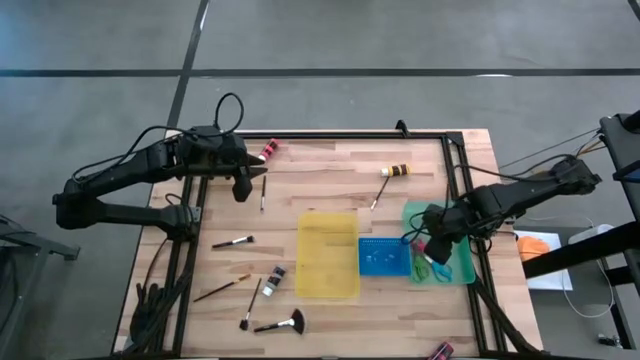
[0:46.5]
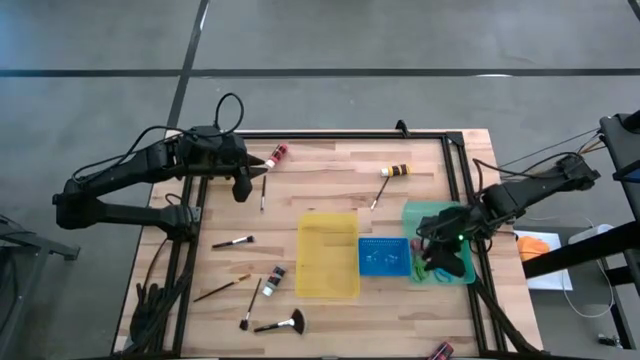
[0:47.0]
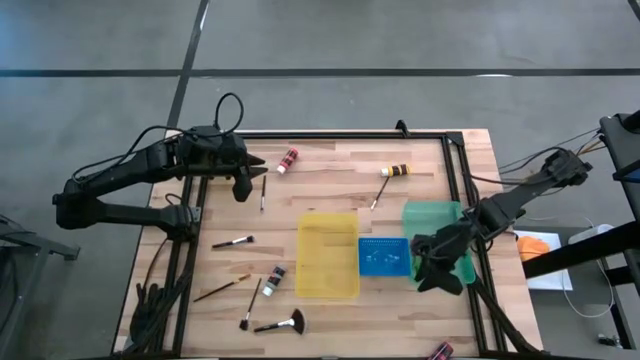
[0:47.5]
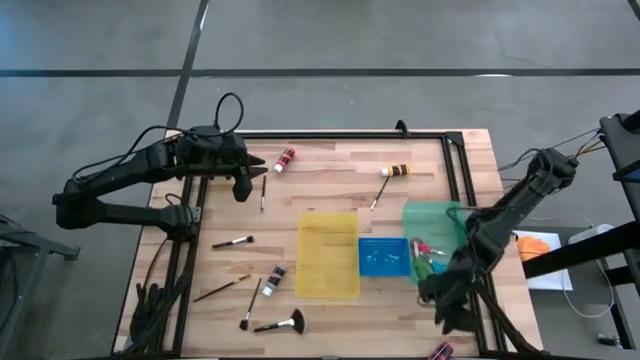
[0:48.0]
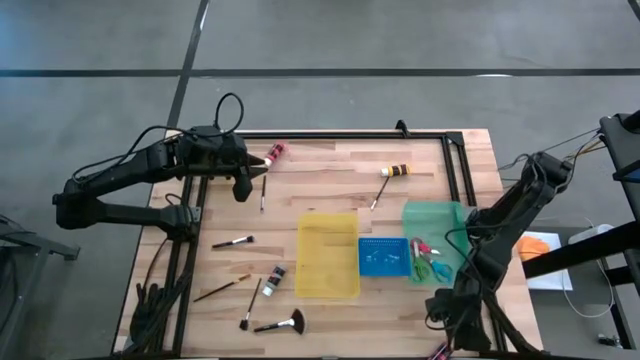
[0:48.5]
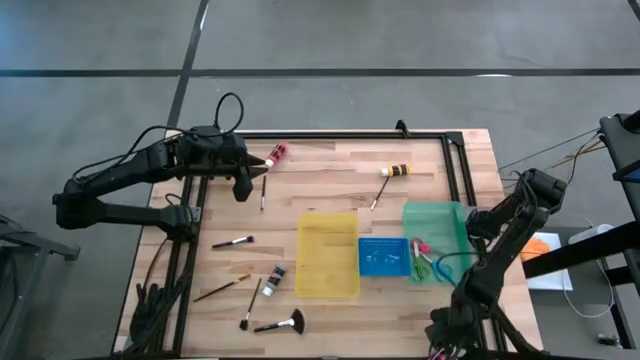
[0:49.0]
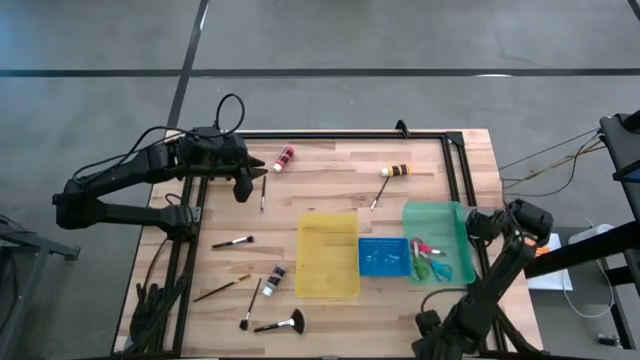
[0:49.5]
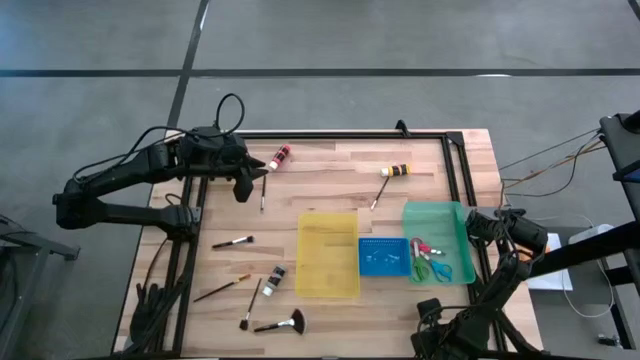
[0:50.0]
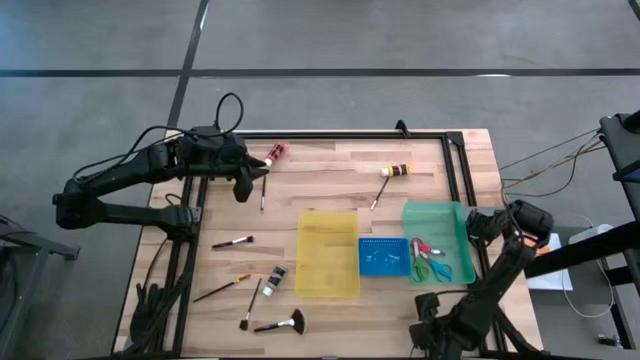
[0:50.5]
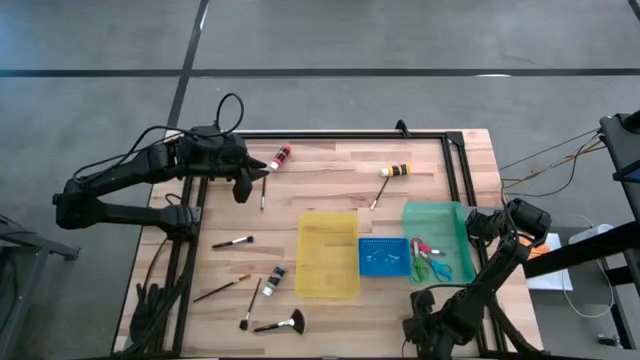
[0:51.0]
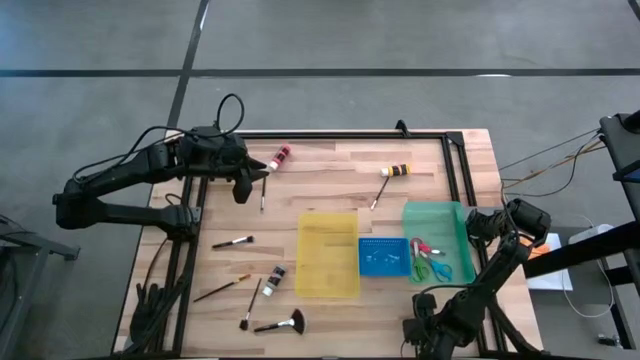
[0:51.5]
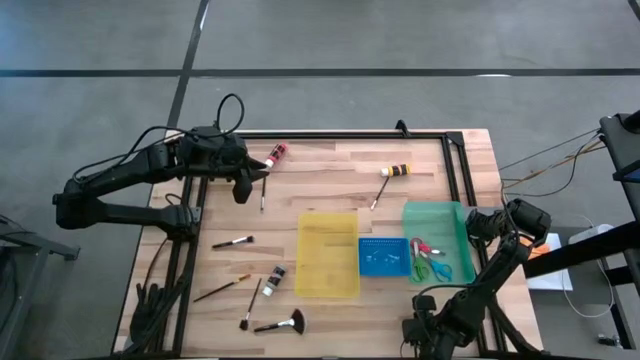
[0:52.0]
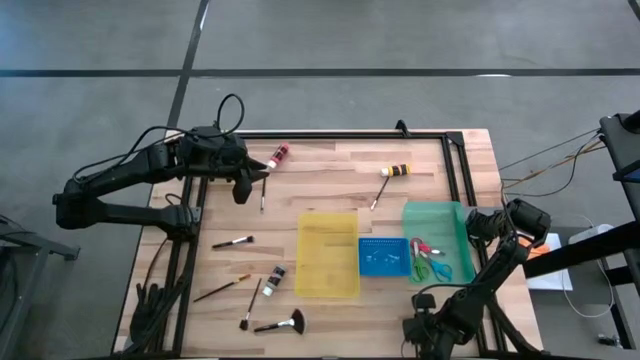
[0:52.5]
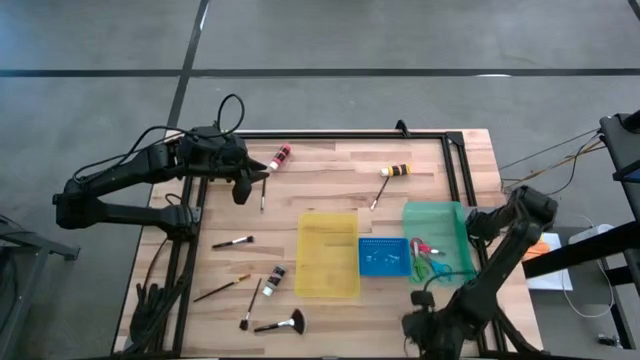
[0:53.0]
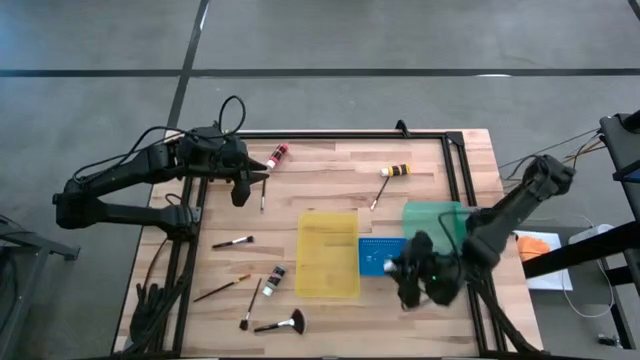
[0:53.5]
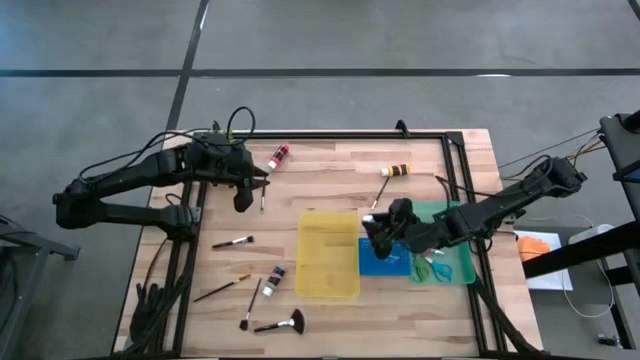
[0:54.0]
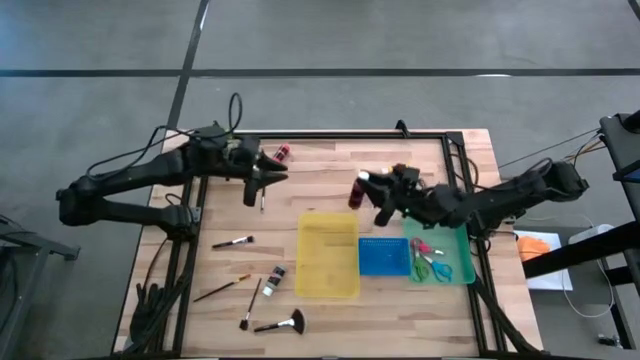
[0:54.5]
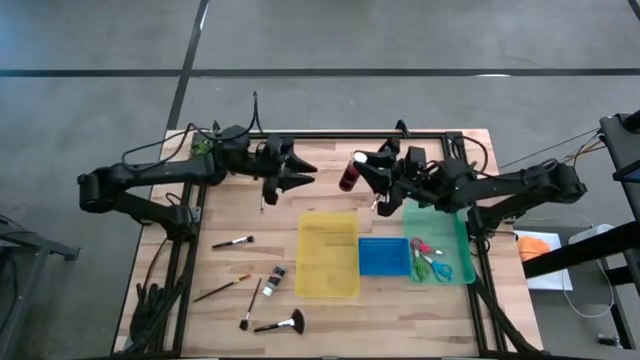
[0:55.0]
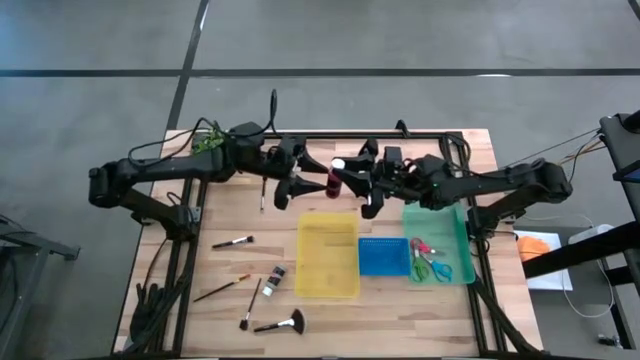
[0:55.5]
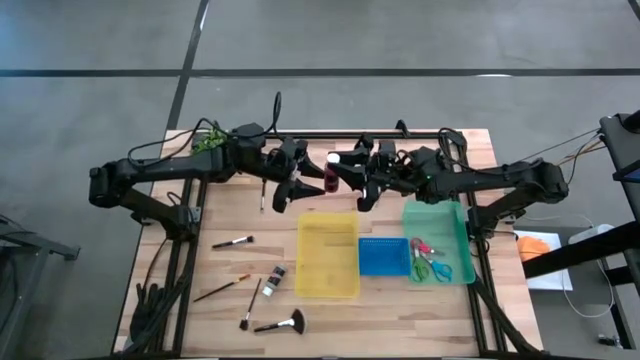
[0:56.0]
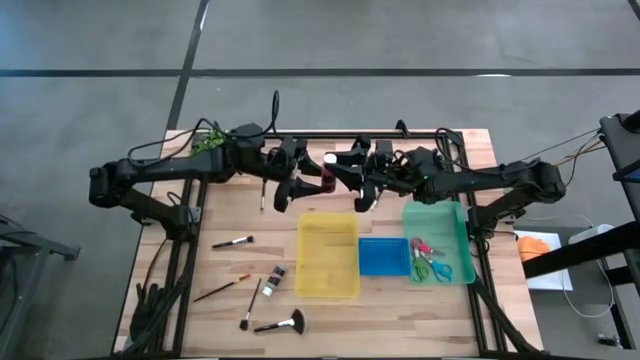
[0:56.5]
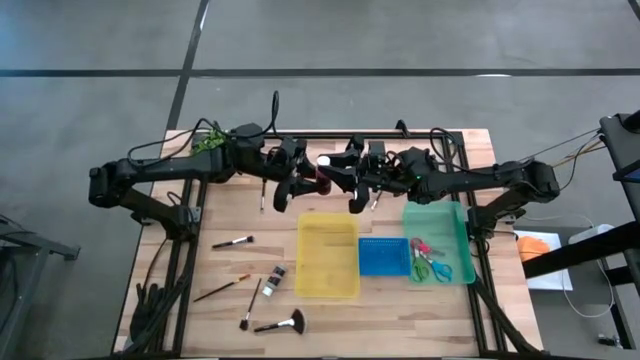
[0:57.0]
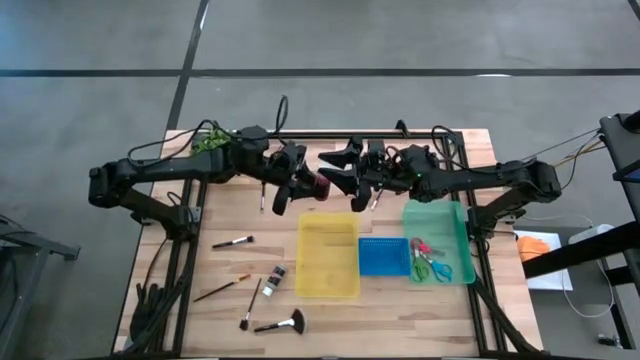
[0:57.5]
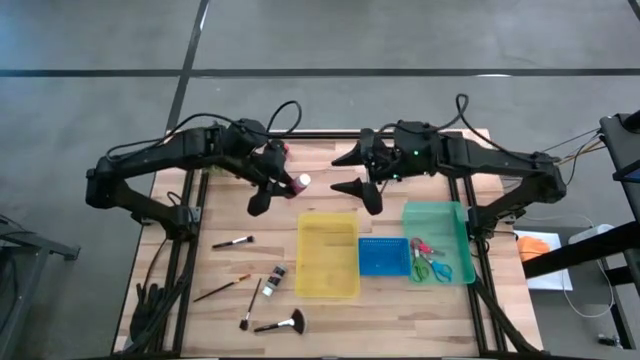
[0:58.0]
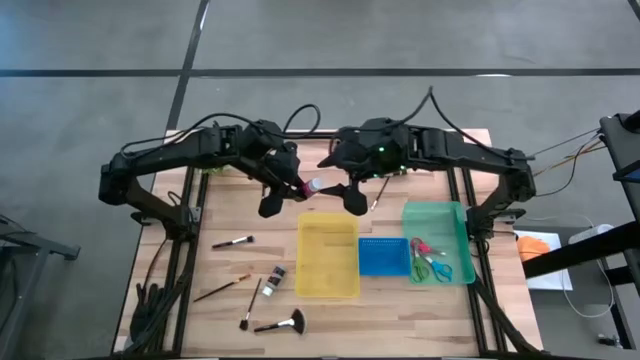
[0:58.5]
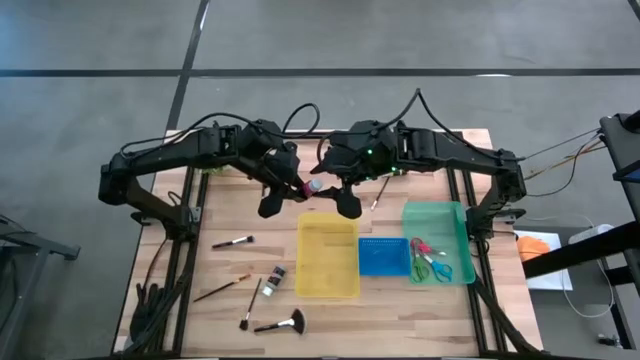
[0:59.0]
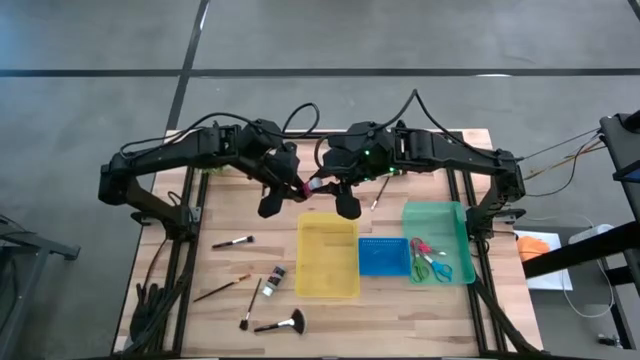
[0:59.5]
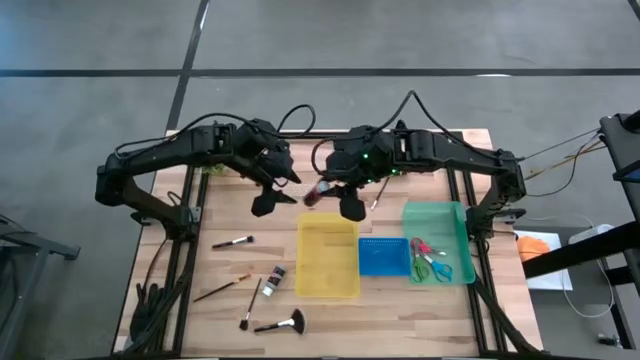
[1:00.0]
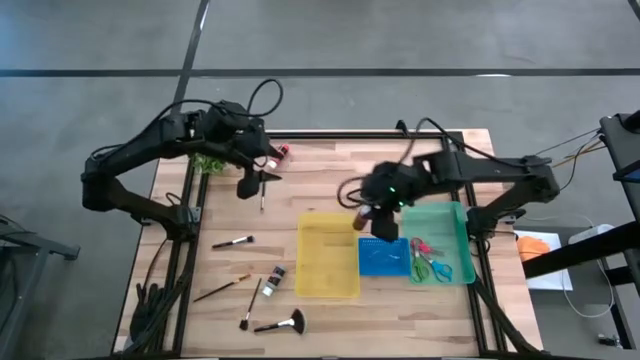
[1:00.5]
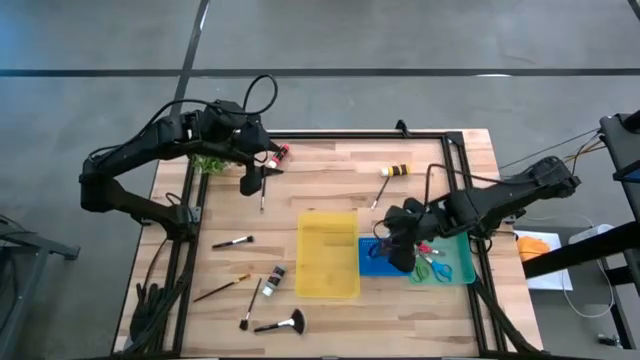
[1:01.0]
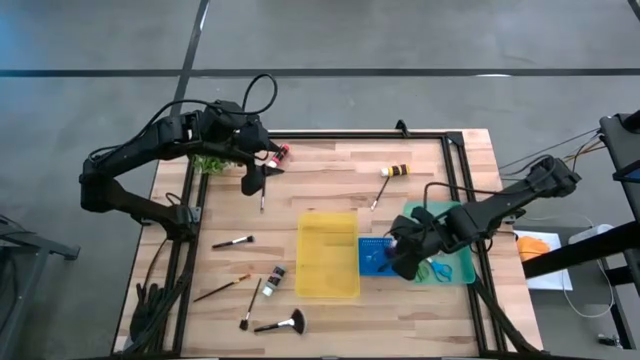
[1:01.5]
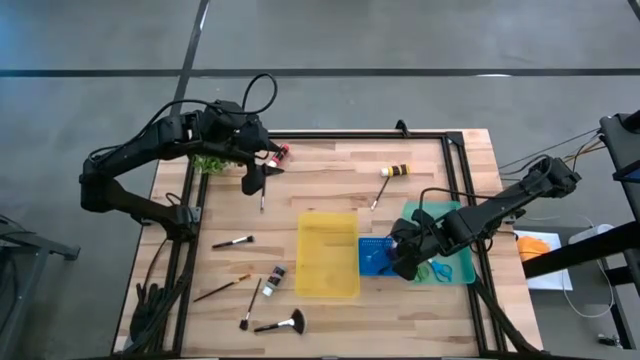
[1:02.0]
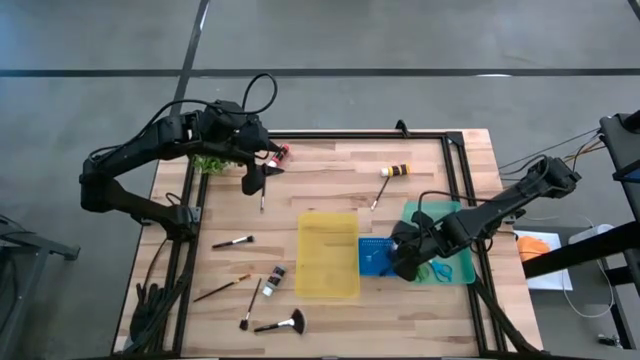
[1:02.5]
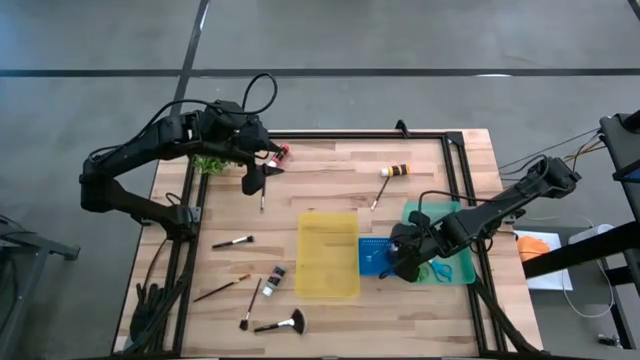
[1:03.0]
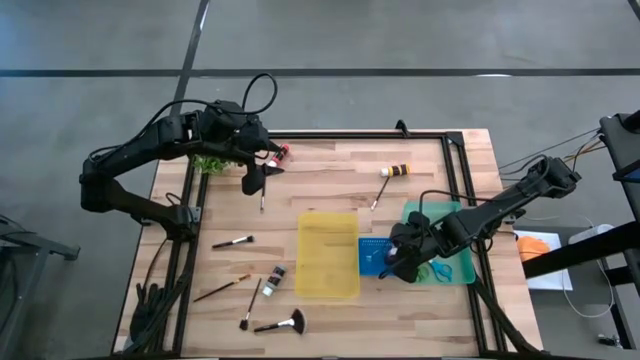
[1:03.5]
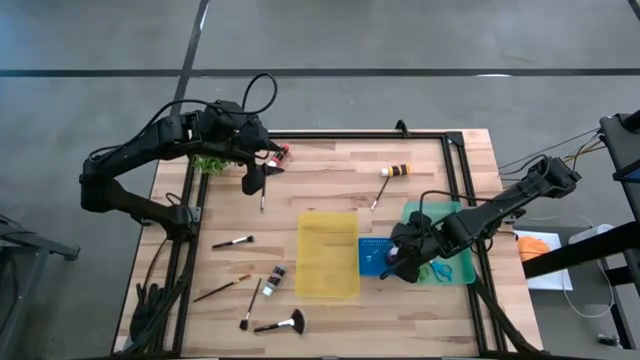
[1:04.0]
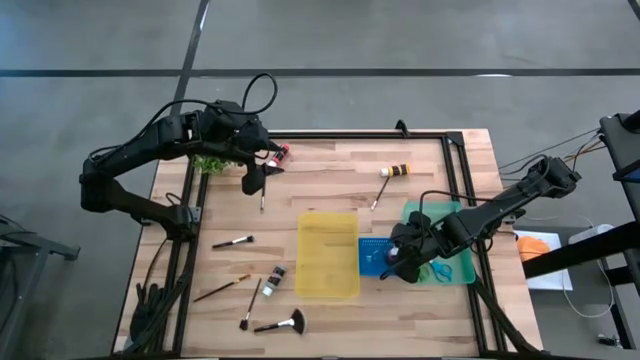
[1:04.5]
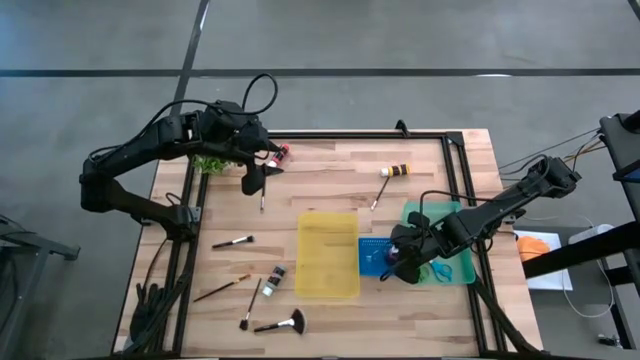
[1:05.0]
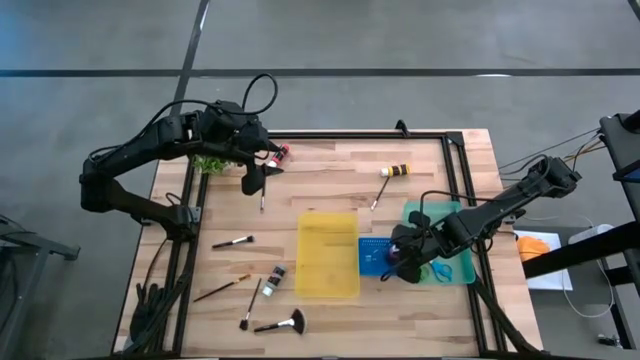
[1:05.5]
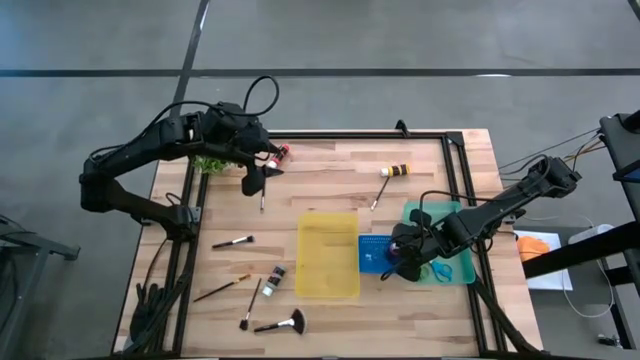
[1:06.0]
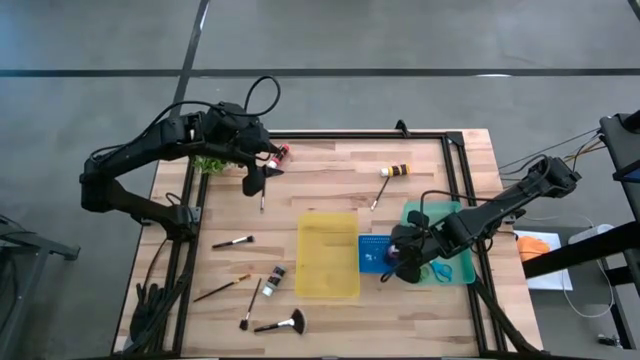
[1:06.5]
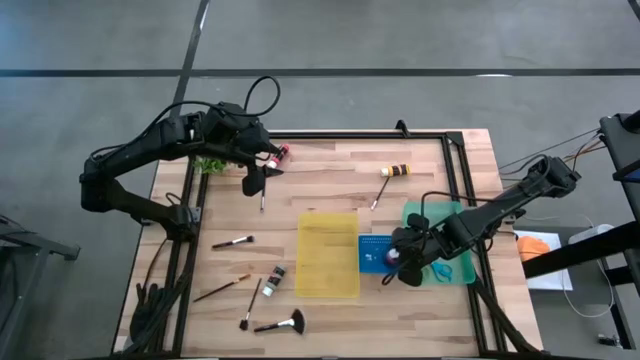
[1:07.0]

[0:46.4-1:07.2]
Task: Pick & Place Paint Supplies
Put the red paint bottle into the blue bin
